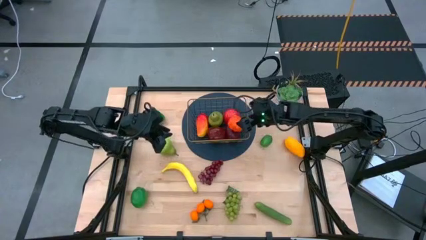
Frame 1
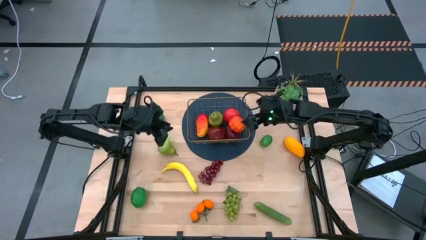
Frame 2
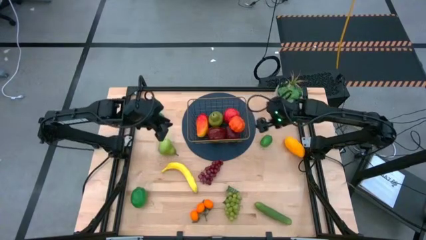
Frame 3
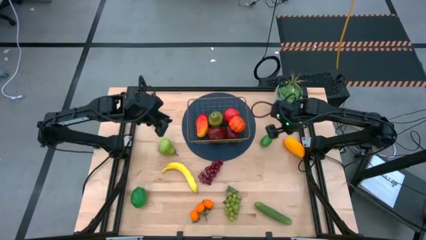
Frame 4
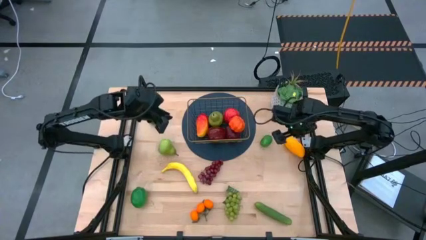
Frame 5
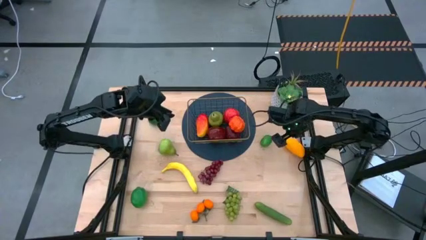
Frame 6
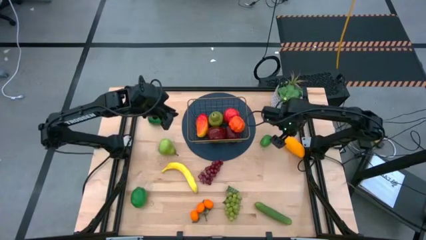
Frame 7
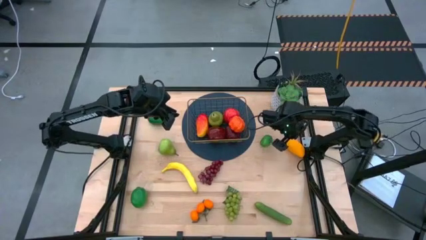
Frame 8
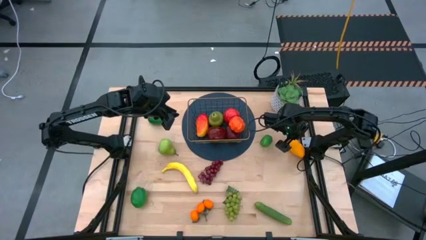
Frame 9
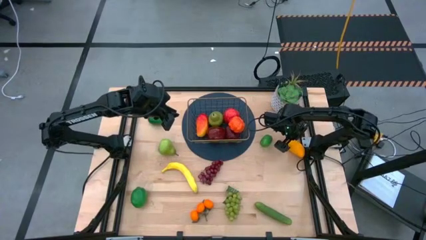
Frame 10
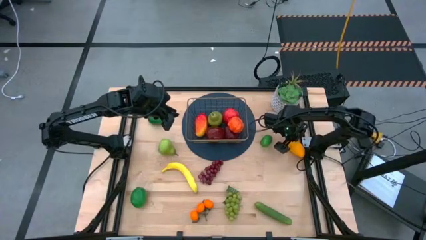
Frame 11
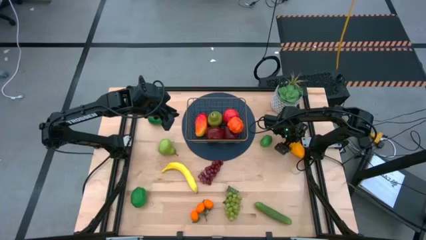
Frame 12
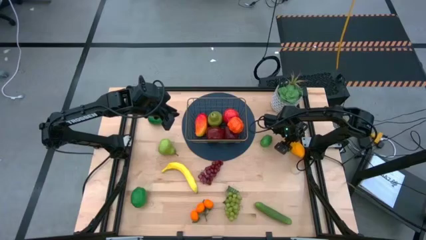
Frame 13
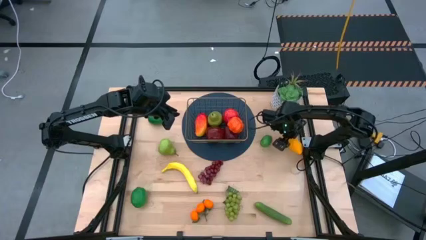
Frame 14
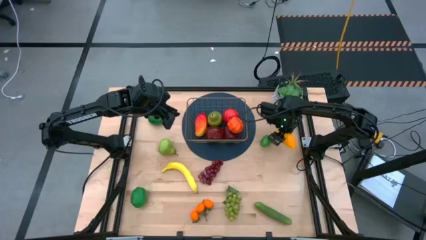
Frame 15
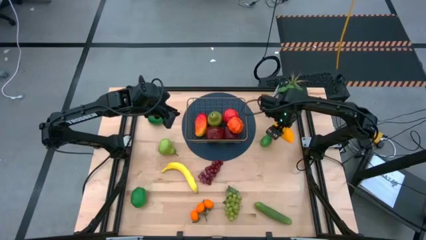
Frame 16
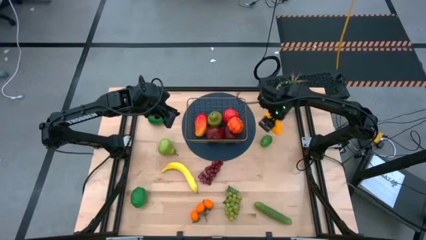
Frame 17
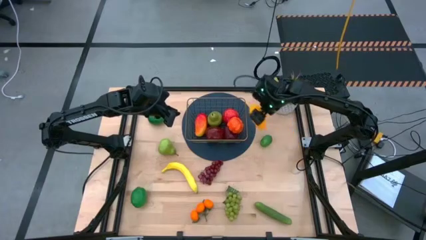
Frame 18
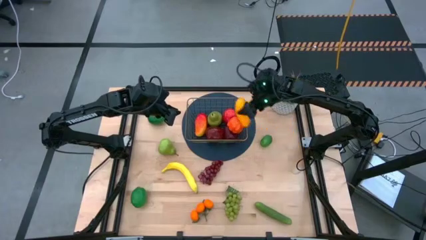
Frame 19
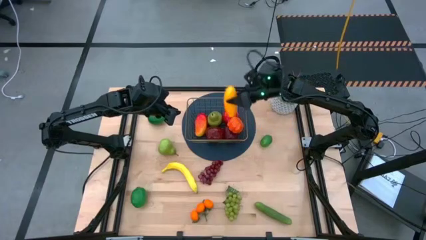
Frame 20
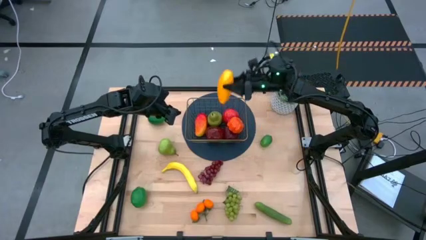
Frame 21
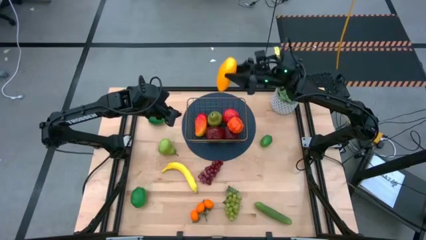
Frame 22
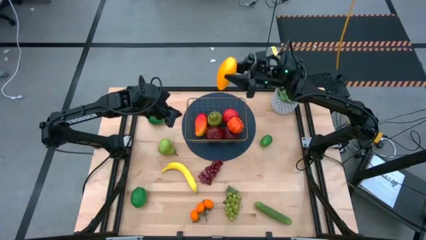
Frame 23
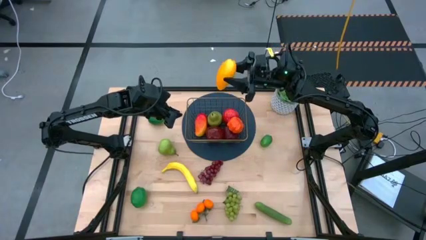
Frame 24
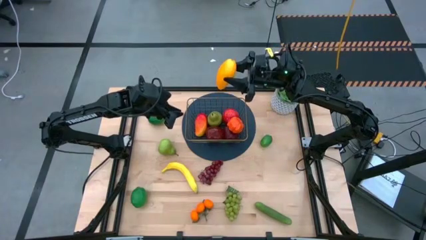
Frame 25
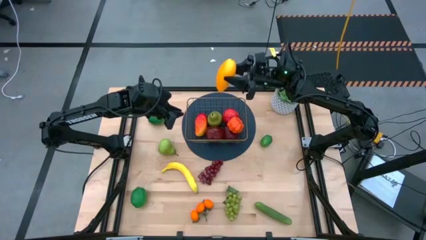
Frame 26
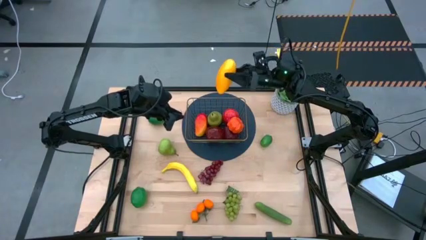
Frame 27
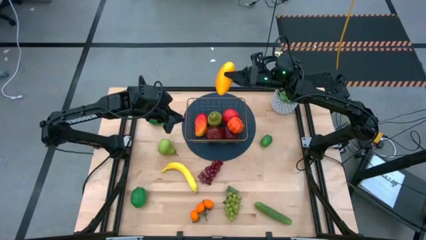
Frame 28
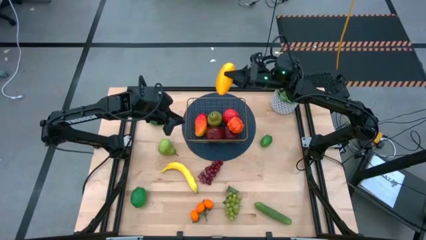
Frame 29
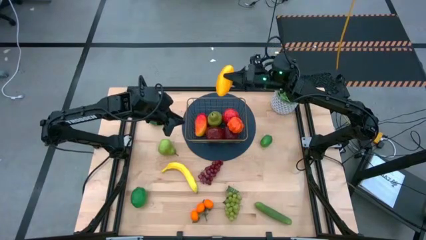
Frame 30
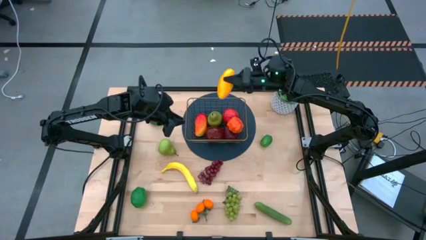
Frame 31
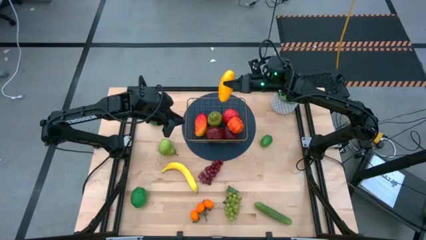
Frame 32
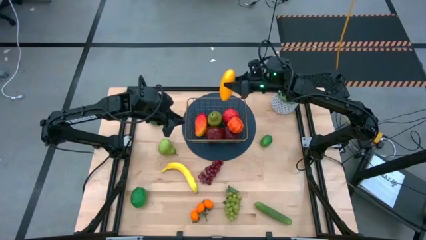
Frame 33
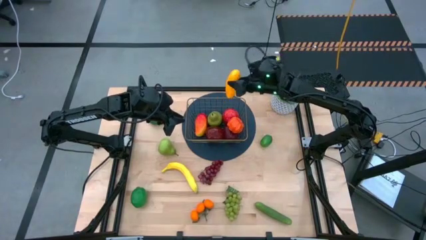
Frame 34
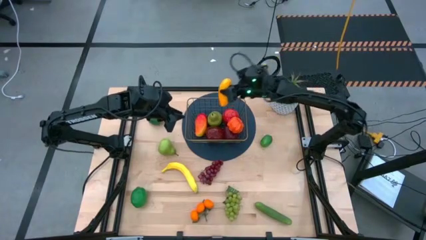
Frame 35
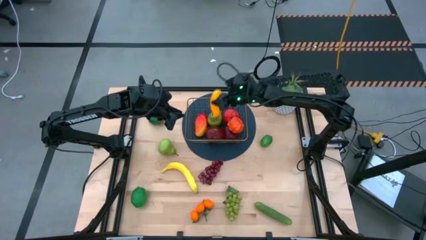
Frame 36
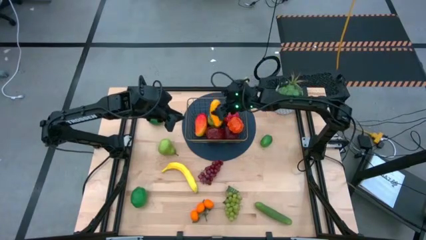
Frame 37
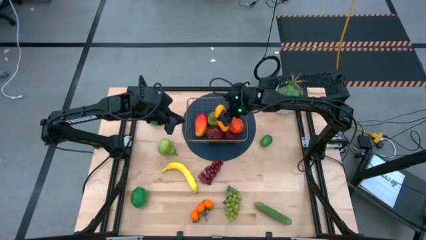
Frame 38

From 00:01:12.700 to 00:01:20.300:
Task: Build produce basket
Put the yellow mango into the wire basket

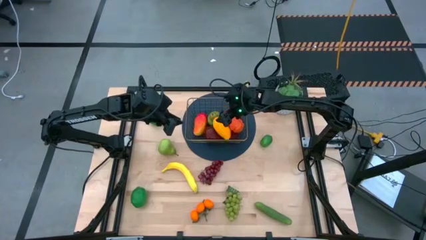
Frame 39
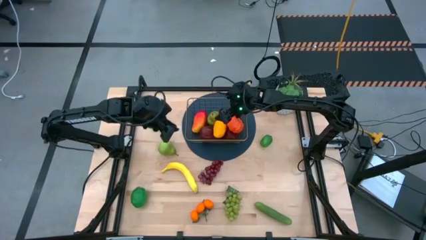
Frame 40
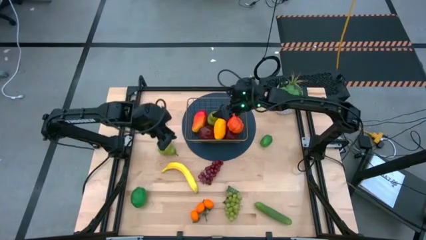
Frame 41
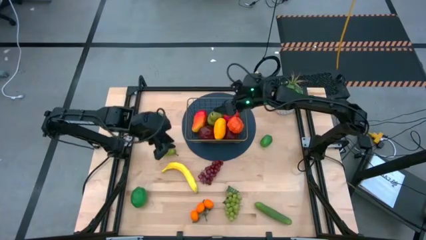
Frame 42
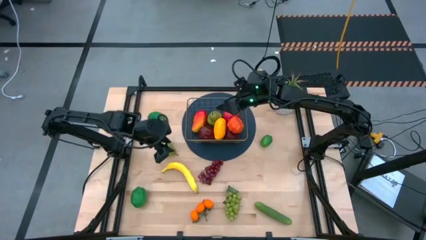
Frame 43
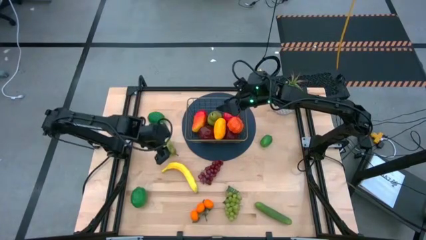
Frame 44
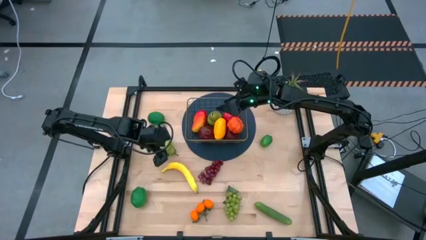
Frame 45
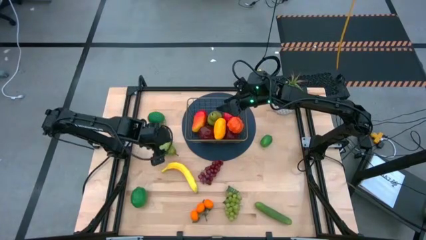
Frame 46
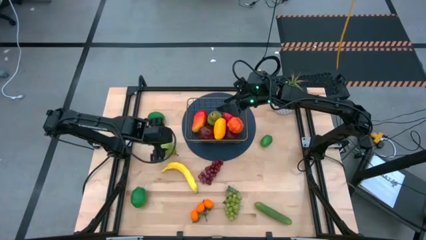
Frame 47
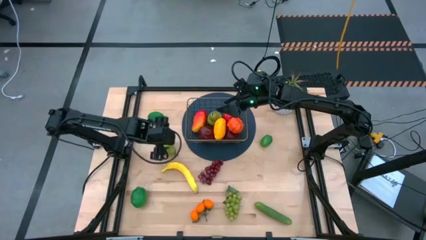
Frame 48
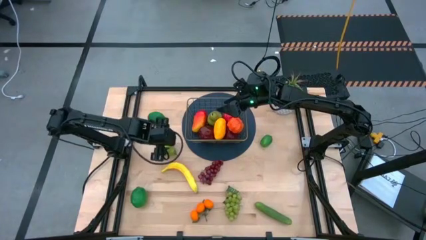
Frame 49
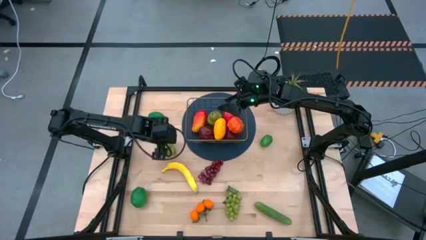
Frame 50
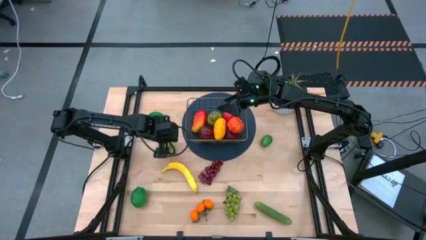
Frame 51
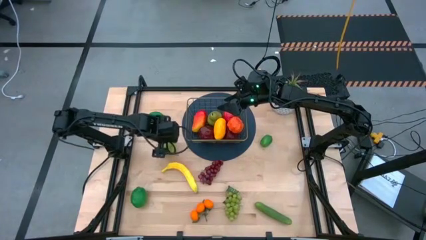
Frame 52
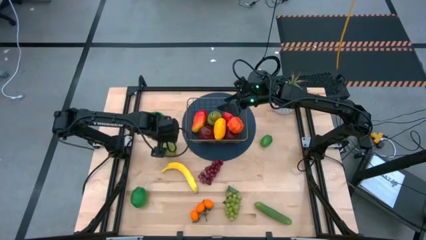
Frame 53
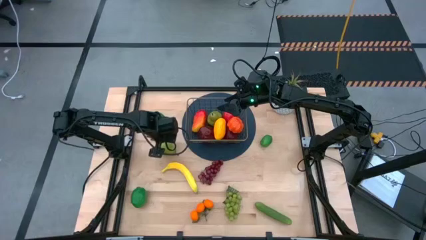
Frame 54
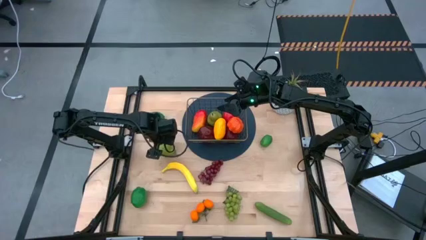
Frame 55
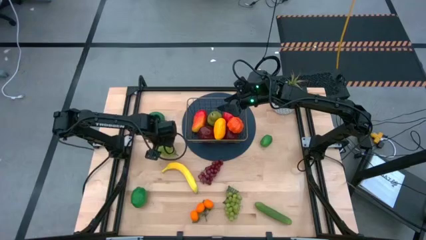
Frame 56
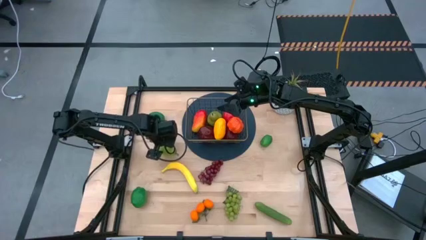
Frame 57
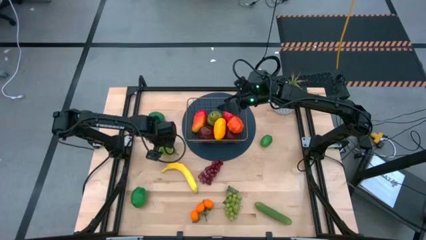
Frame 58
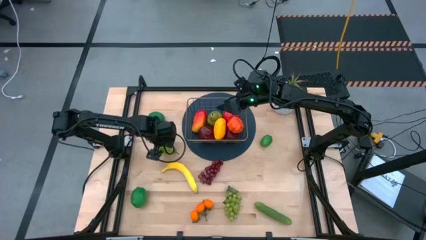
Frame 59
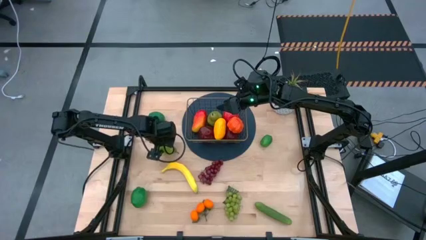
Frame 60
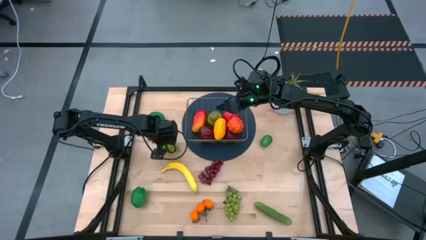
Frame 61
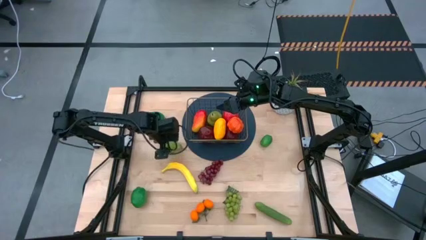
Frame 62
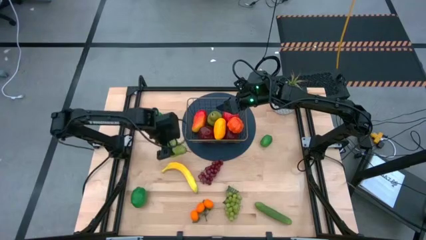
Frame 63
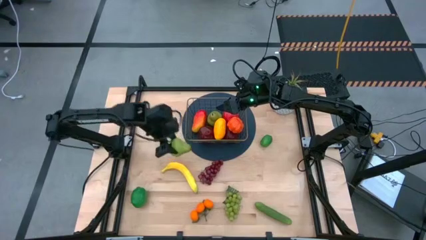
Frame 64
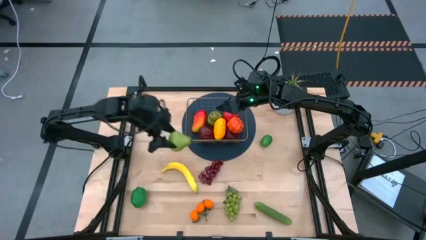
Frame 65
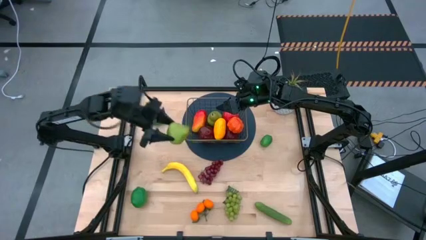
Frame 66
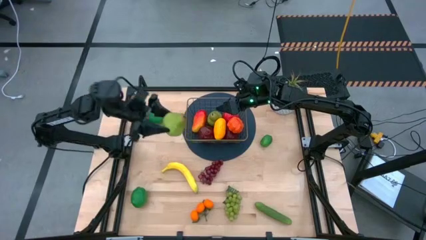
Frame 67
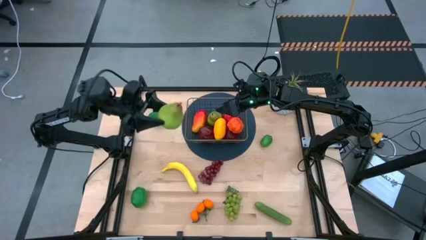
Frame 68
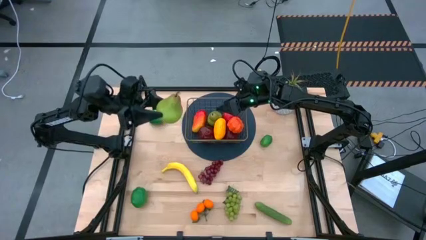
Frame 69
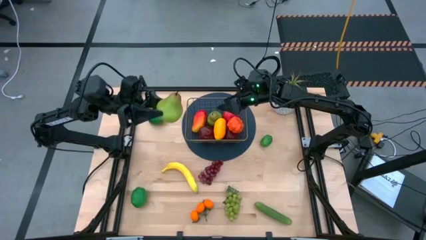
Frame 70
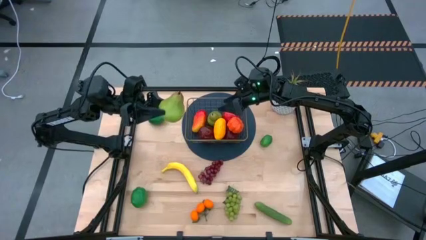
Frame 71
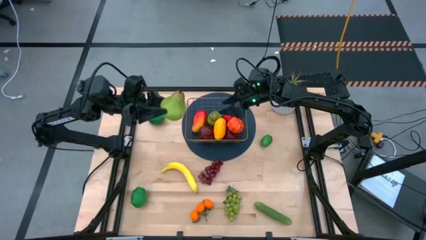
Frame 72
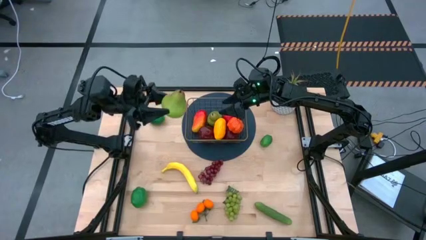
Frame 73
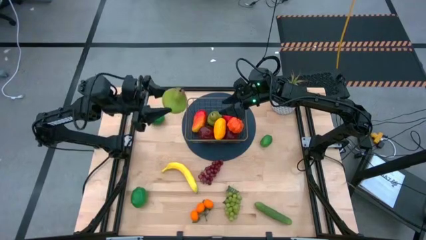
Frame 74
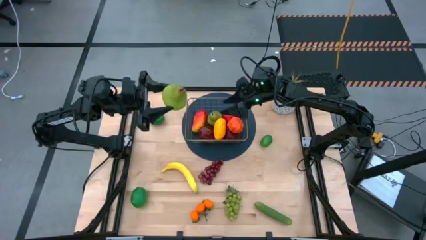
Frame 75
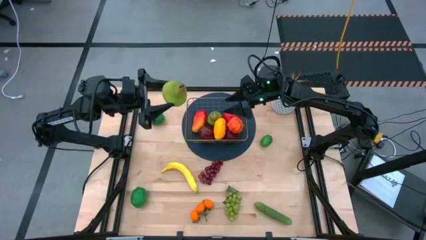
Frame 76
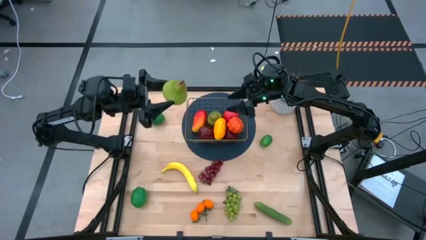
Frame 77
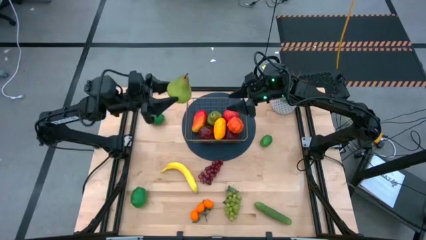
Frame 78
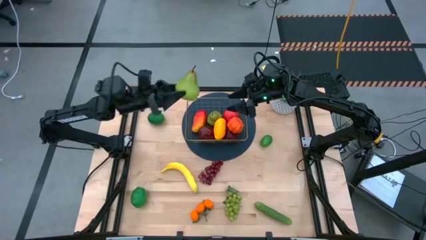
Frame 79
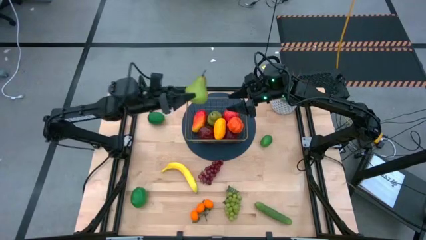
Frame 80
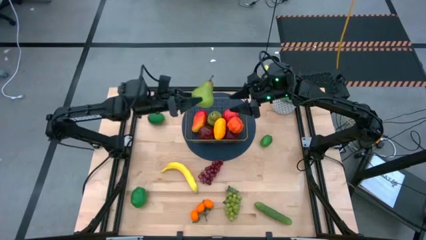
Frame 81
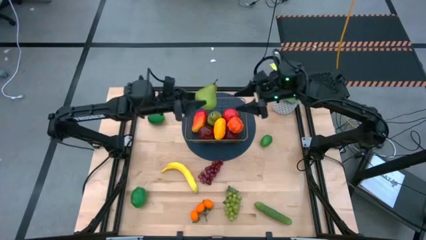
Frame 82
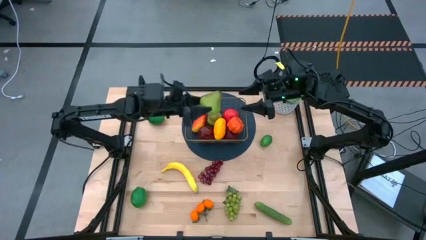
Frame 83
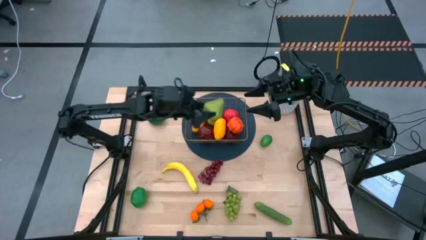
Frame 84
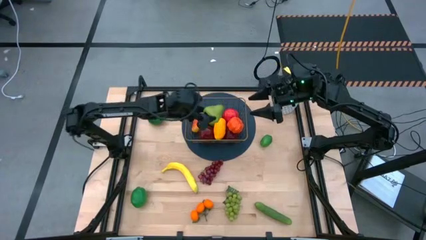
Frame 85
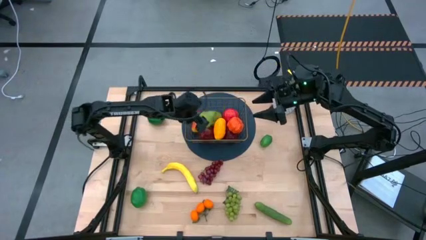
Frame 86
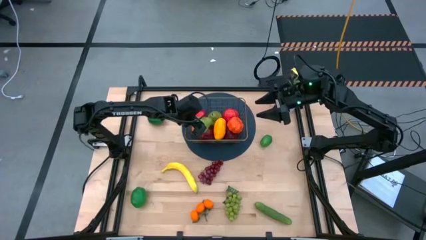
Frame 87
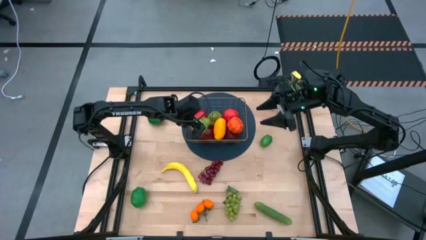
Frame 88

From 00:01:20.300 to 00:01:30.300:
Put the green pear into the wire basket
